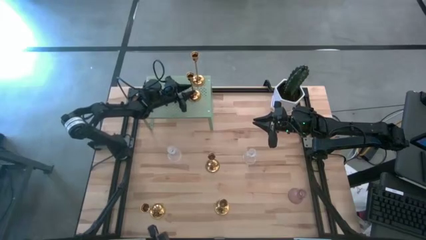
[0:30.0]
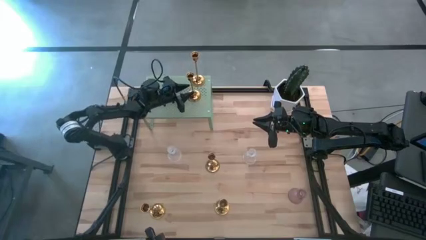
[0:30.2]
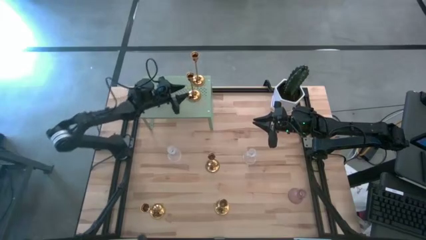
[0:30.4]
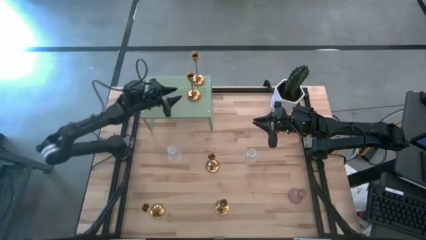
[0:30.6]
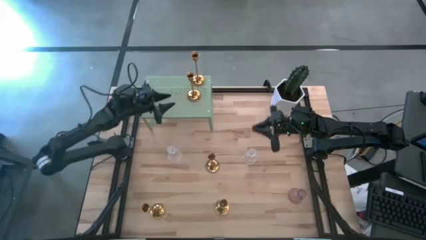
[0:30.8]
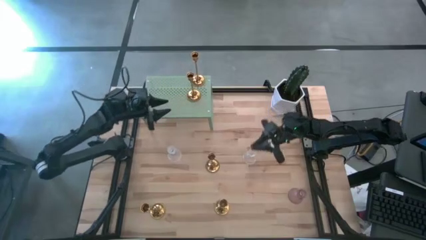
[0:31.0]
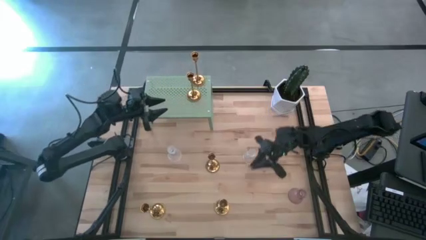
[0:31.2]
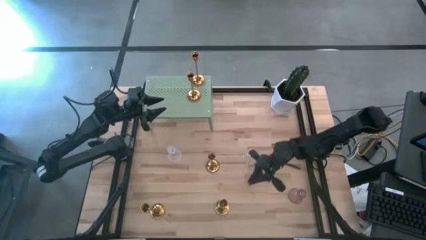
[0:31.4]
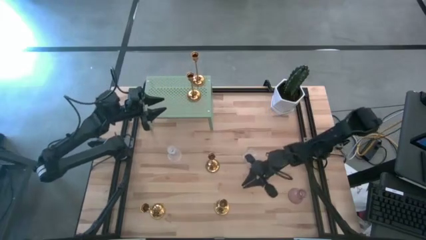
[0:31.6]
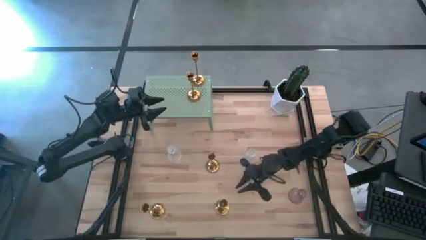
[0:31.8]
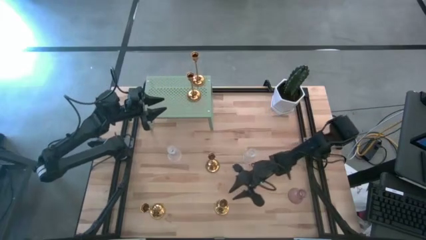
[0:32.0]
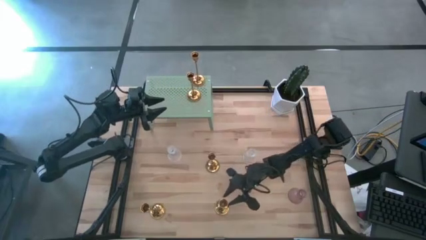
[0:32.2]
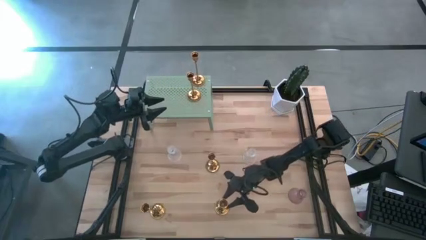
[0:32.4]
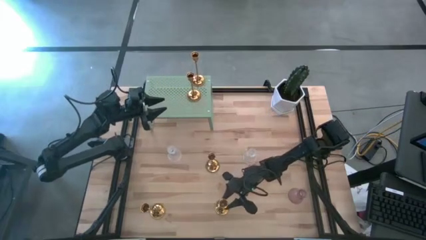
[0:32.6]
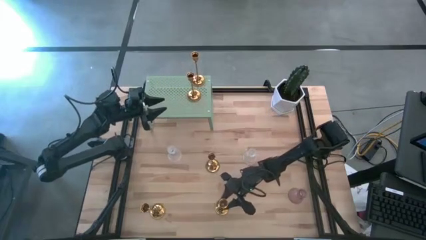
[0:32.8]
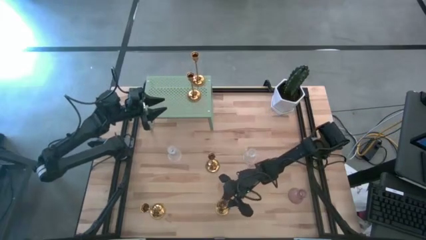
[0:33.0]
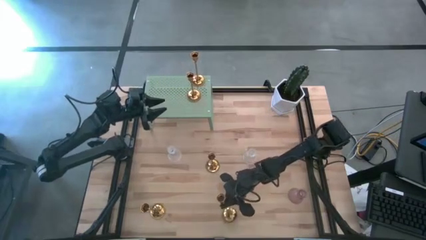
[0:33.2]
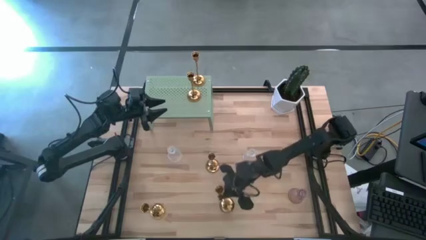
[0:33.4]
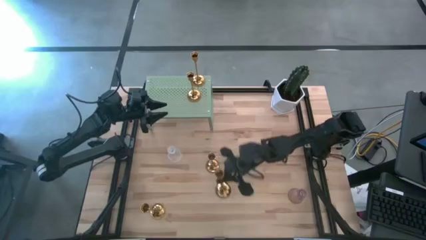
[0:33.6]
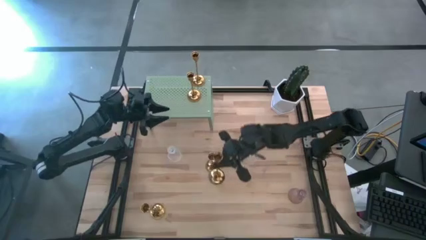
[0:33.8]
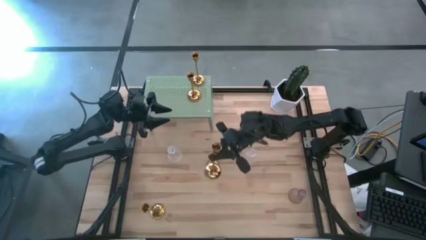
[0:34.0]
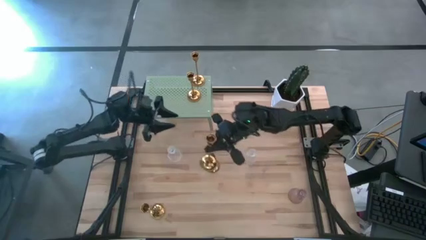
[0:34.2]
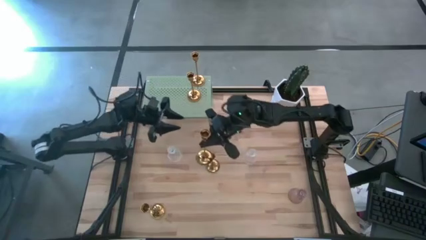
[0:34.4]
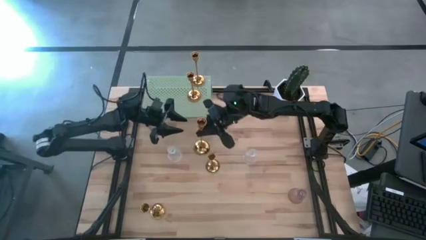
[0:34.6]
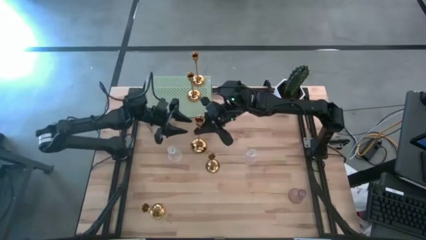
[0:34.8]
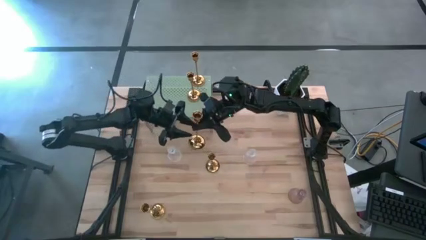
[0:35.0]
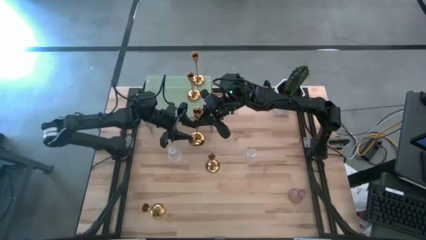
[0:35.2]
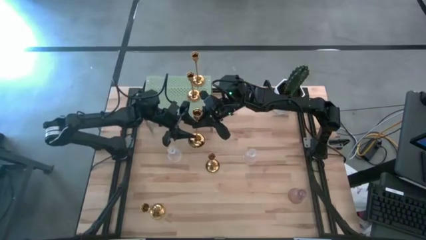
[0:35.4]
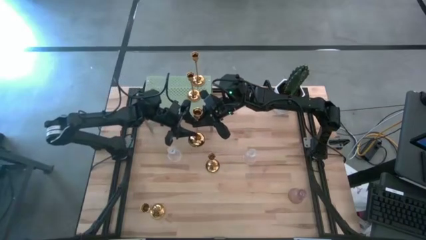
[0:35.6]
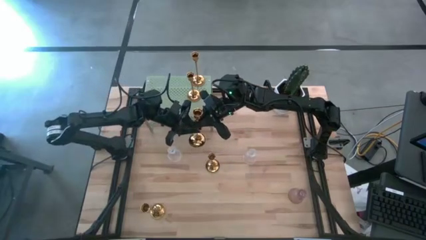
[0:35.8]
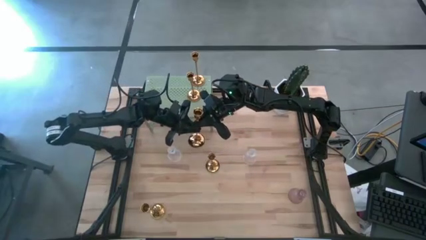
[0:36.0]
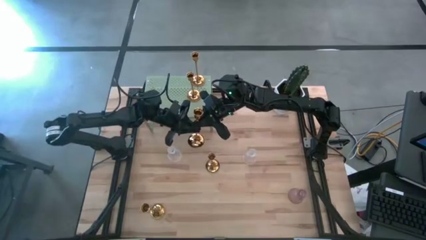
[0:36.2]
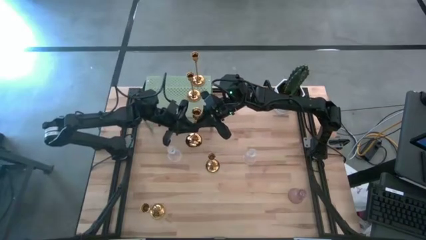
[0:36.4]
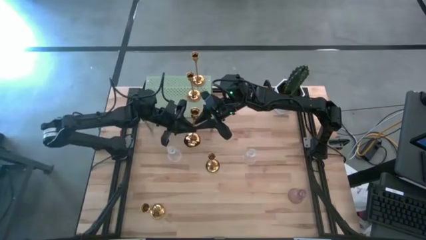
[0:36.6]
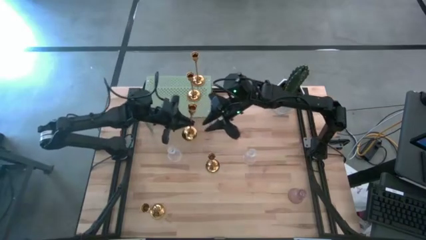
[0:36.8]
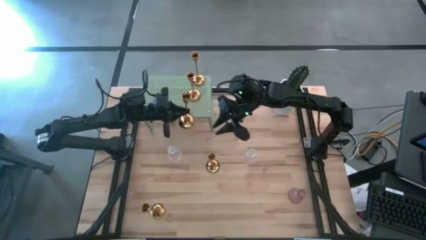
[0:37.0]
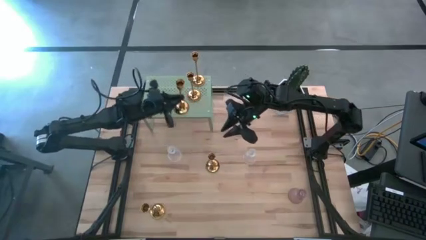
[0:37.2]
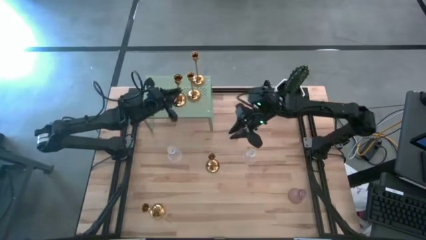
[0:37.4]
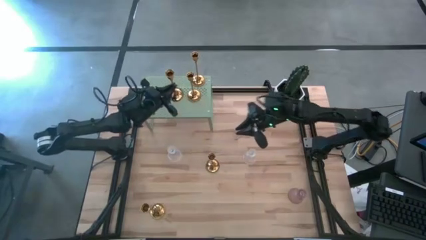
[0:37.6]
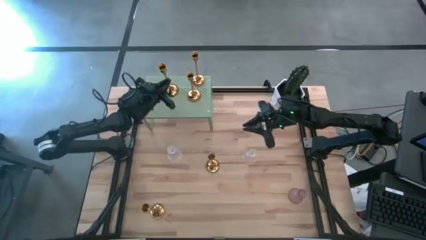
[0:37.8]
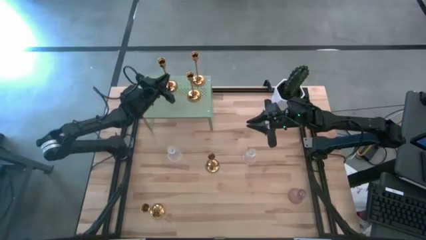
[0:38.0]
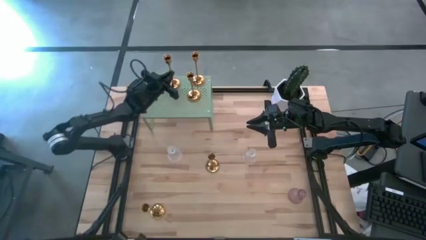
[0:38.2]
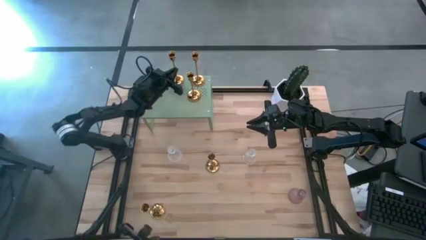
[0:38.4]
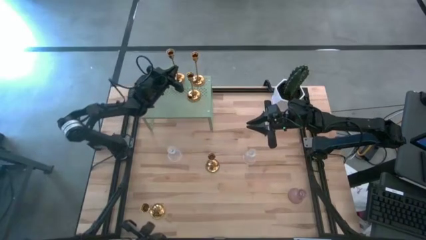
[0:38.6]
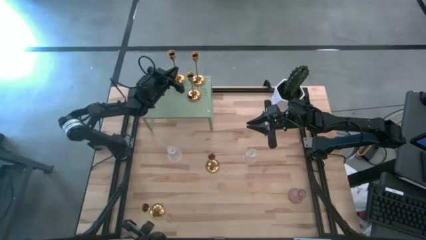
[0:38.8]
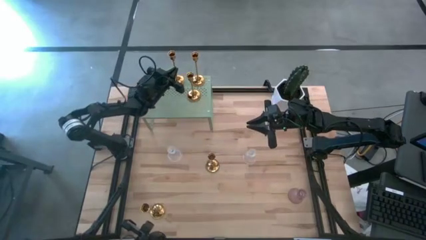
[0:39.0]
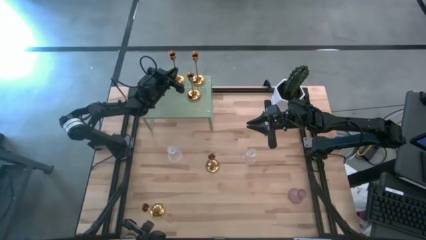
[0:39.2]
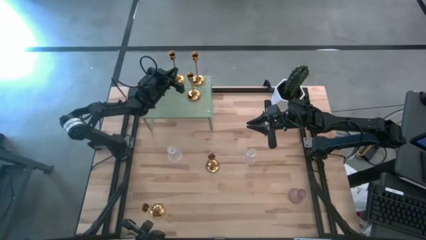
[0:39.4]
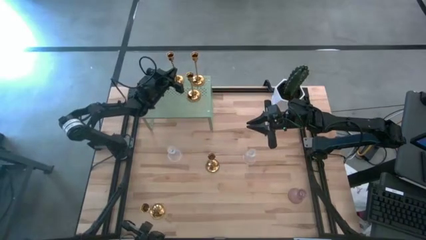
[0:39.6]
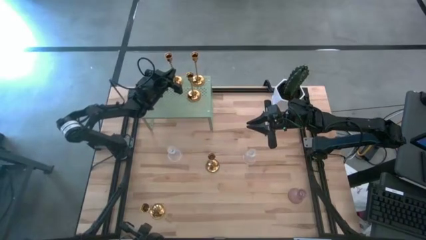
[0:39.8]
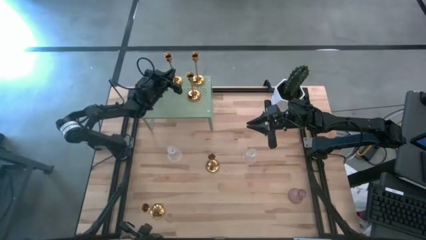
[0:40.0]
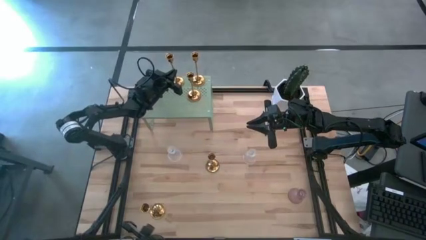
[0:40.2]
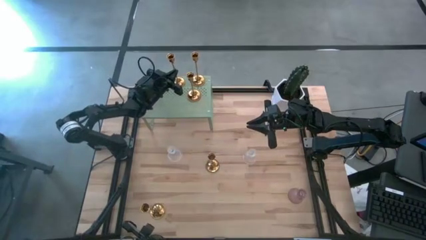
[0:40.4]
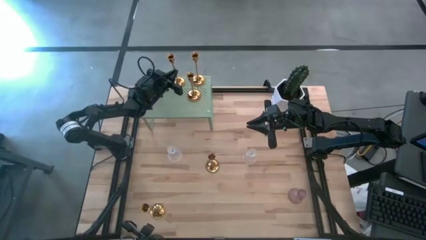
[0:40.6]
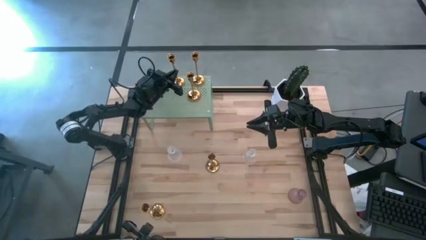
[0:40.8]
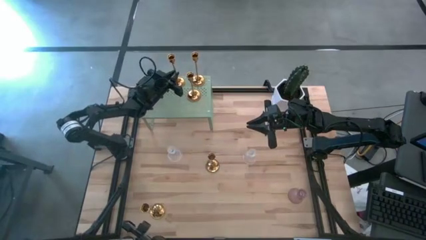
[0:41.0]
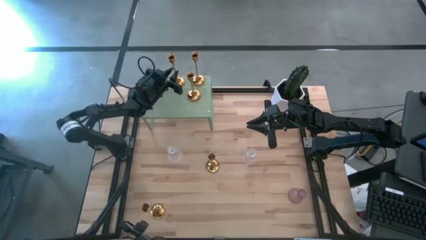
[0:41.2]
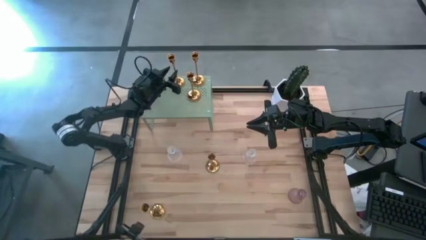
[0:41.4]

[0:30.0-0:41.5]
Task: Pick & Place candle stick holders
Put the bottom right candle holder on the shelf
